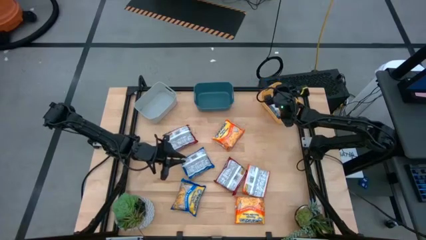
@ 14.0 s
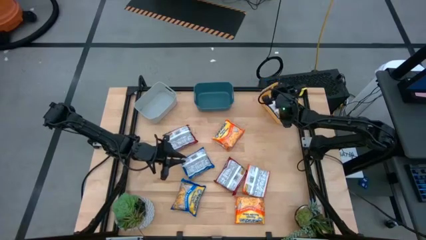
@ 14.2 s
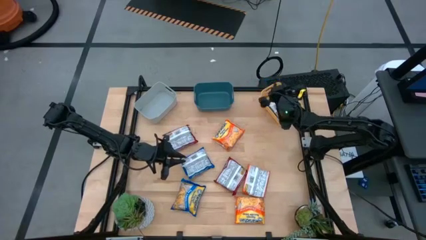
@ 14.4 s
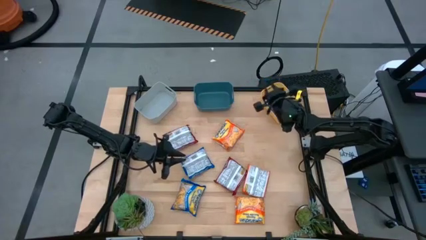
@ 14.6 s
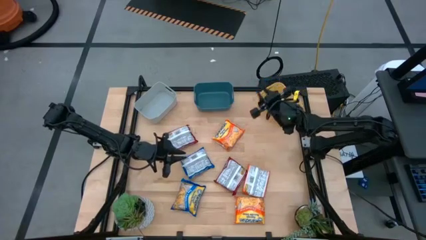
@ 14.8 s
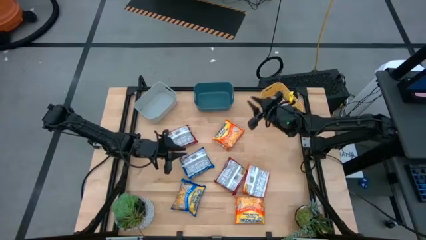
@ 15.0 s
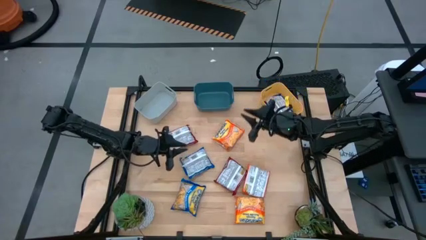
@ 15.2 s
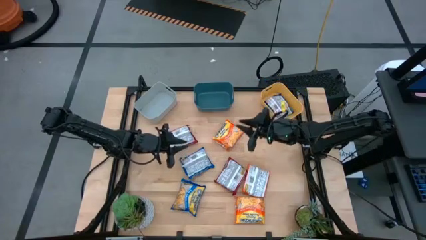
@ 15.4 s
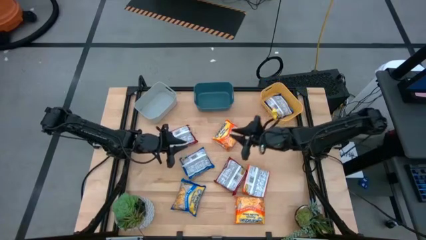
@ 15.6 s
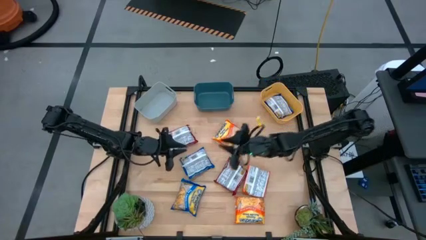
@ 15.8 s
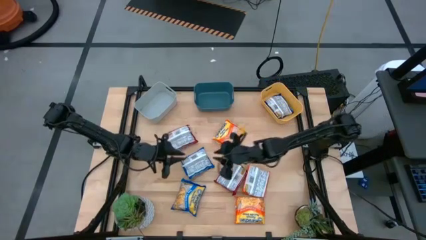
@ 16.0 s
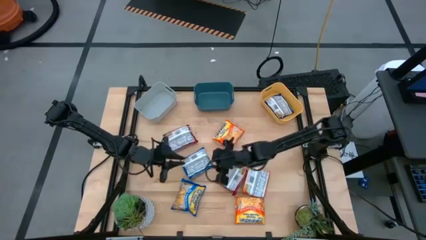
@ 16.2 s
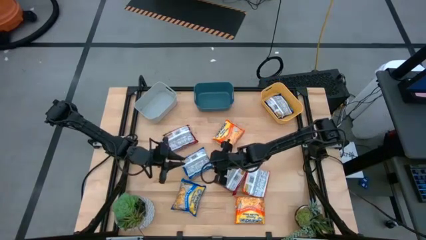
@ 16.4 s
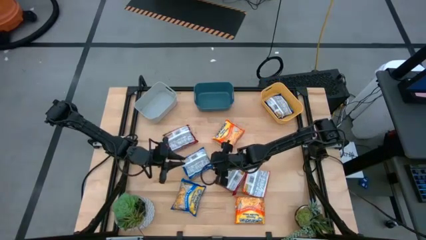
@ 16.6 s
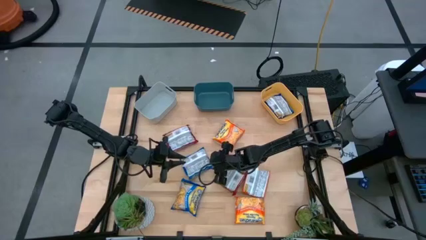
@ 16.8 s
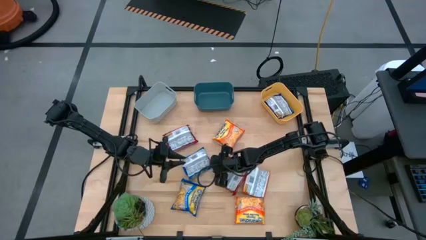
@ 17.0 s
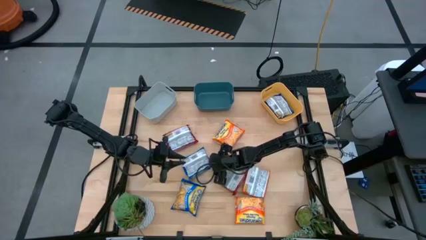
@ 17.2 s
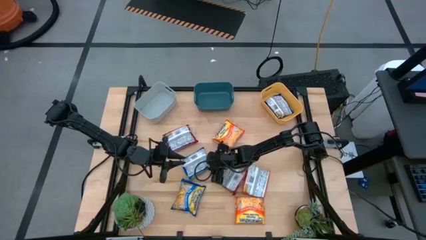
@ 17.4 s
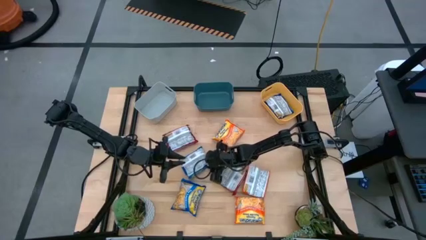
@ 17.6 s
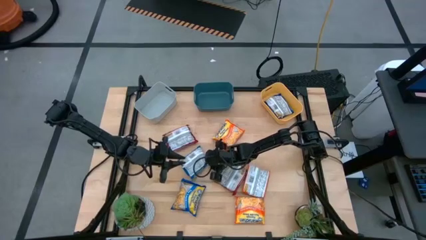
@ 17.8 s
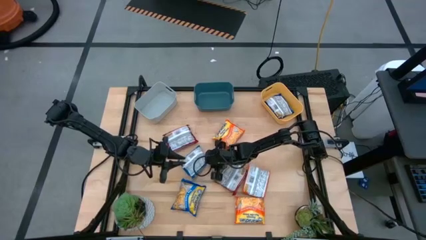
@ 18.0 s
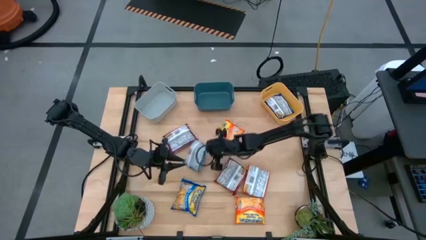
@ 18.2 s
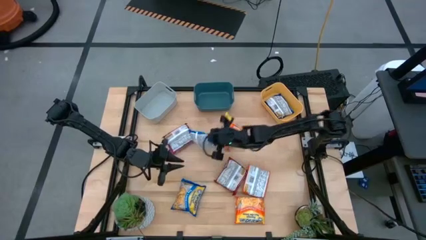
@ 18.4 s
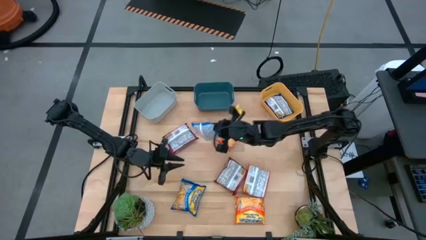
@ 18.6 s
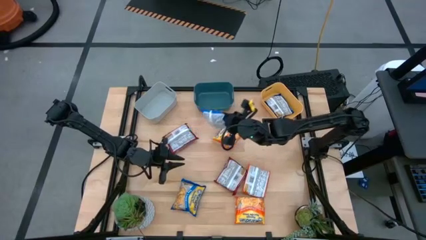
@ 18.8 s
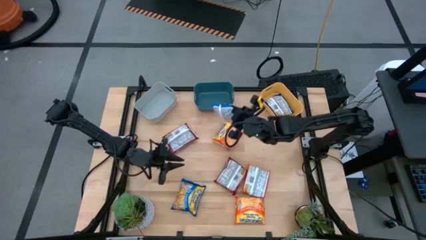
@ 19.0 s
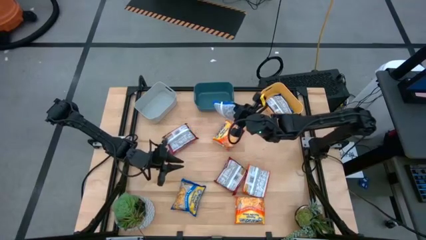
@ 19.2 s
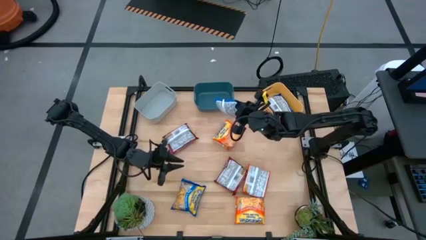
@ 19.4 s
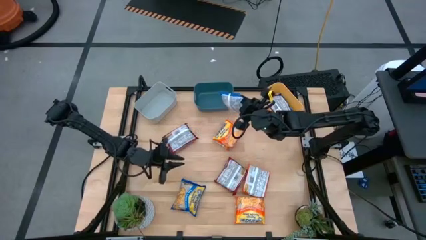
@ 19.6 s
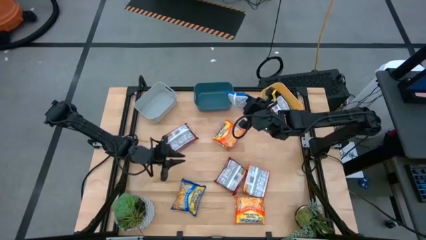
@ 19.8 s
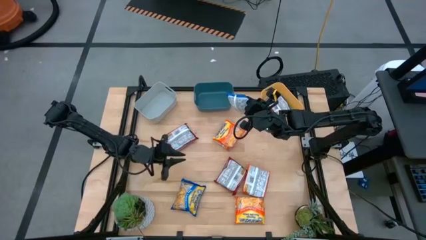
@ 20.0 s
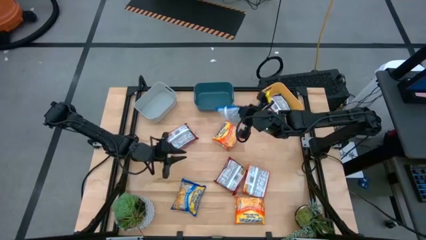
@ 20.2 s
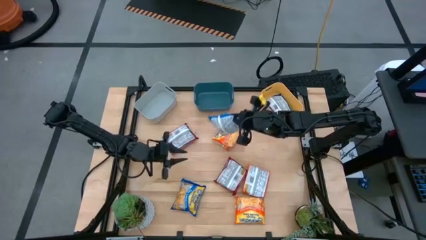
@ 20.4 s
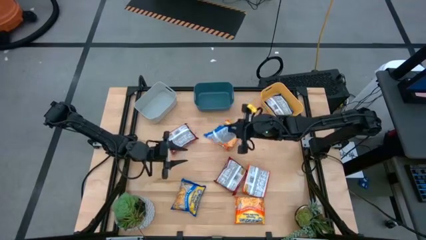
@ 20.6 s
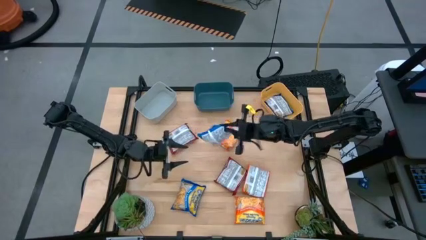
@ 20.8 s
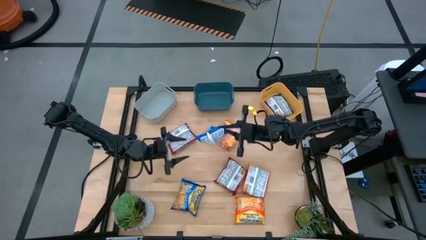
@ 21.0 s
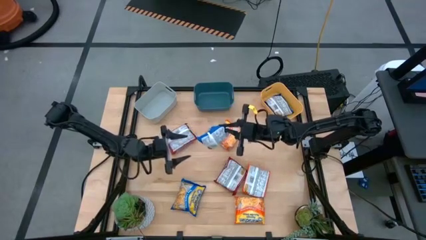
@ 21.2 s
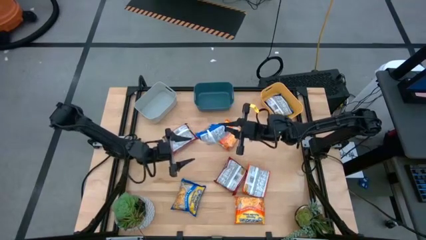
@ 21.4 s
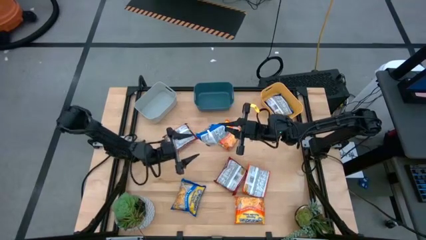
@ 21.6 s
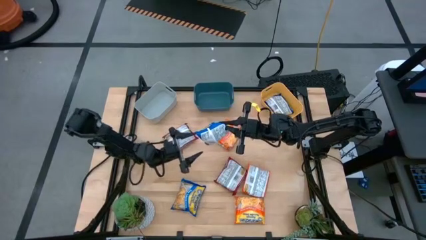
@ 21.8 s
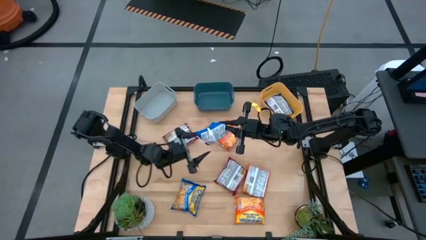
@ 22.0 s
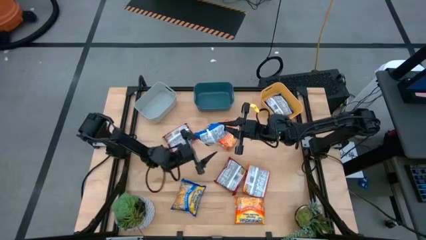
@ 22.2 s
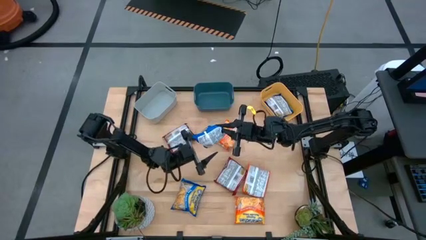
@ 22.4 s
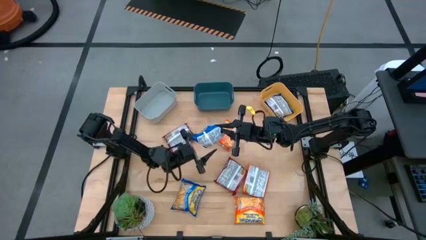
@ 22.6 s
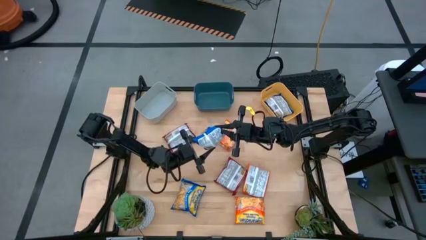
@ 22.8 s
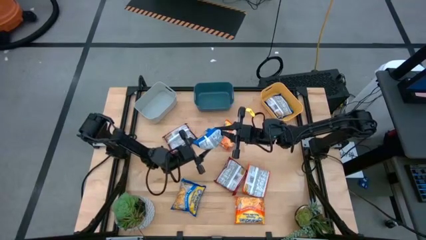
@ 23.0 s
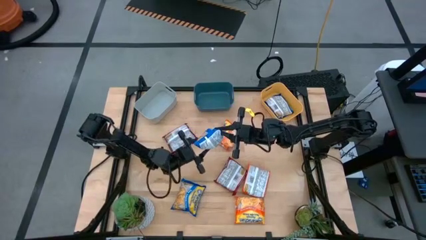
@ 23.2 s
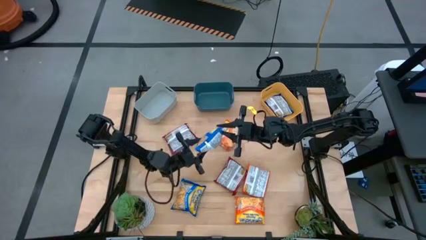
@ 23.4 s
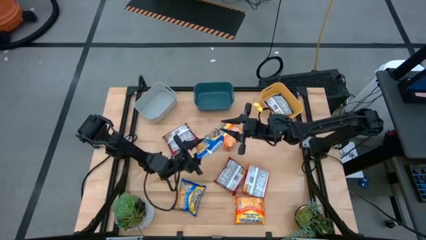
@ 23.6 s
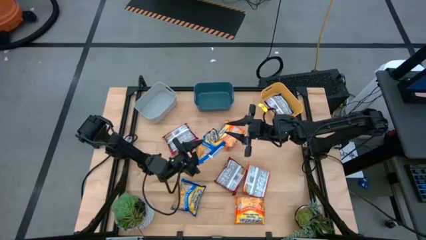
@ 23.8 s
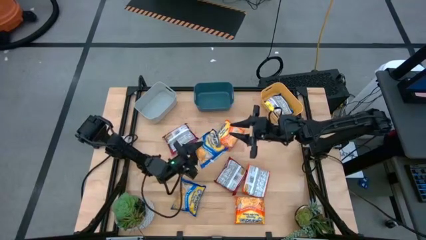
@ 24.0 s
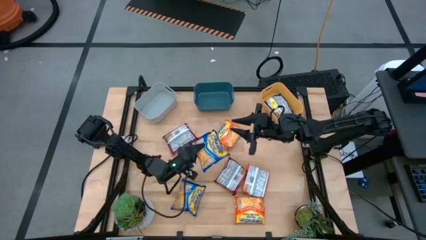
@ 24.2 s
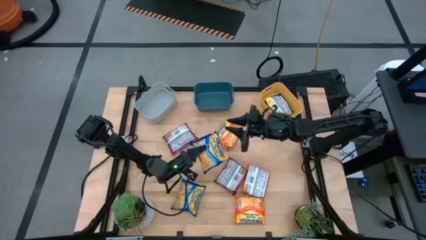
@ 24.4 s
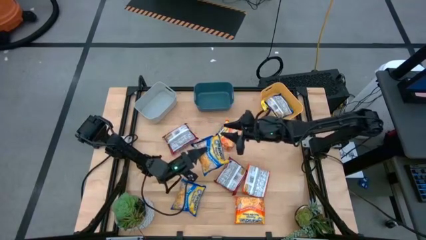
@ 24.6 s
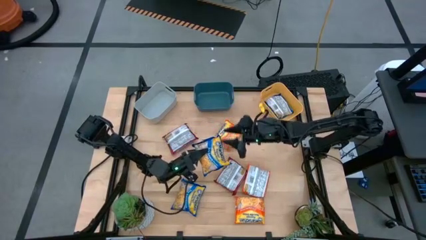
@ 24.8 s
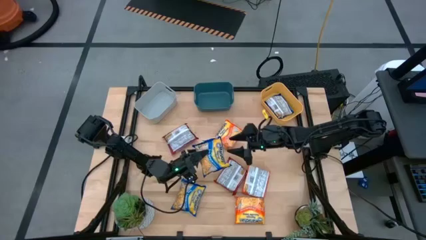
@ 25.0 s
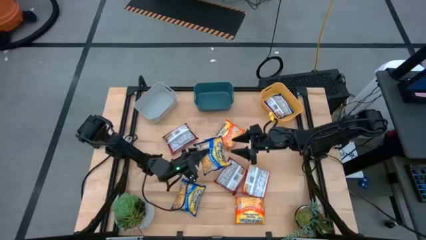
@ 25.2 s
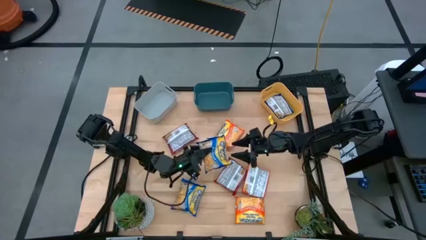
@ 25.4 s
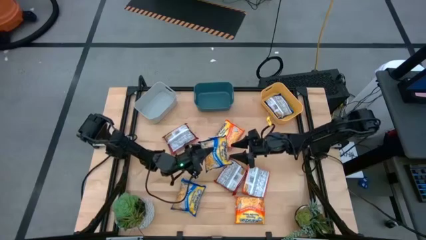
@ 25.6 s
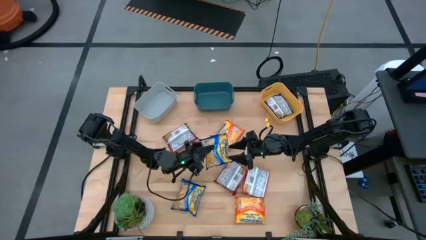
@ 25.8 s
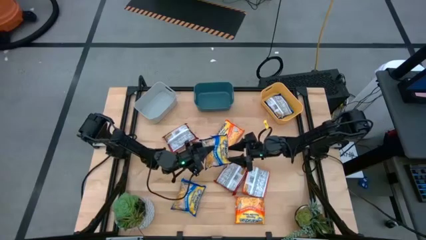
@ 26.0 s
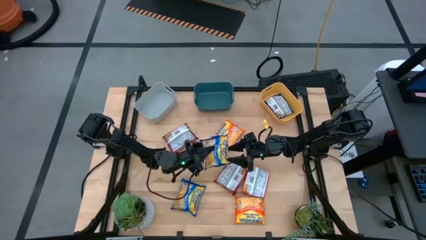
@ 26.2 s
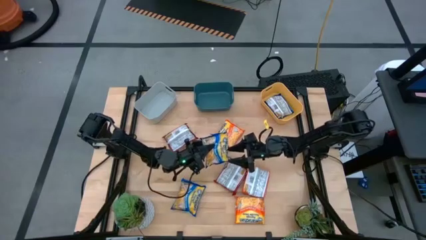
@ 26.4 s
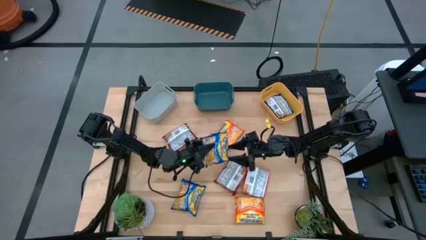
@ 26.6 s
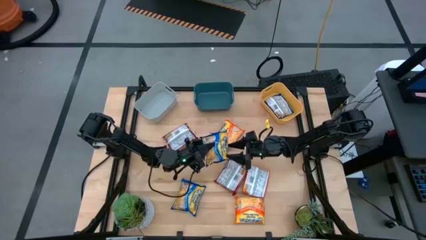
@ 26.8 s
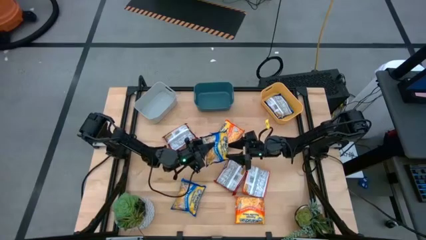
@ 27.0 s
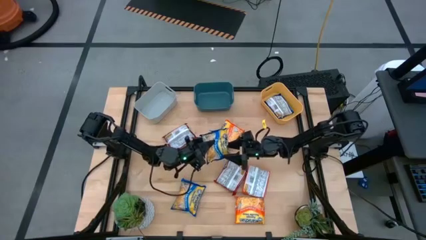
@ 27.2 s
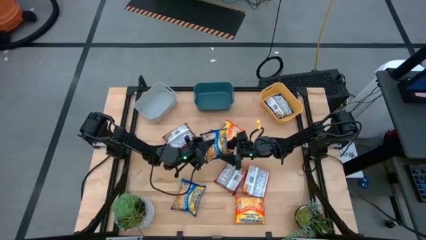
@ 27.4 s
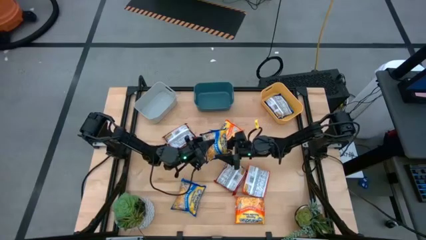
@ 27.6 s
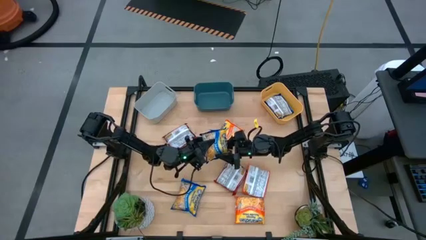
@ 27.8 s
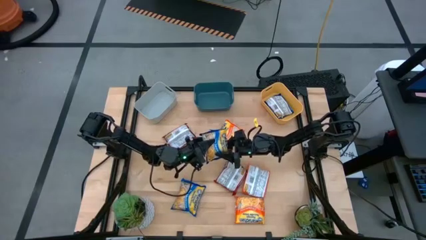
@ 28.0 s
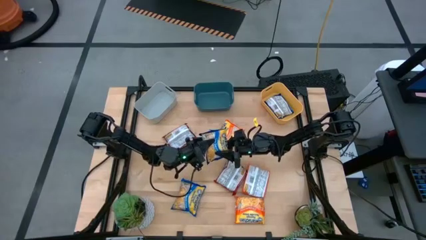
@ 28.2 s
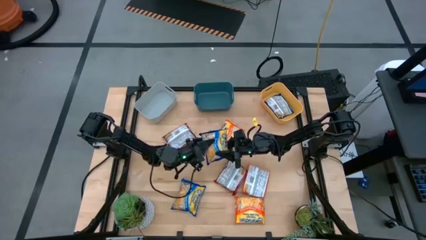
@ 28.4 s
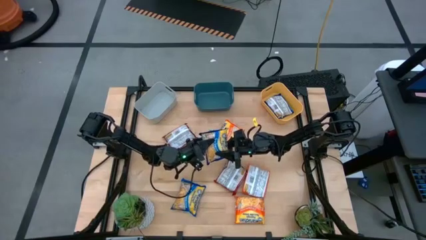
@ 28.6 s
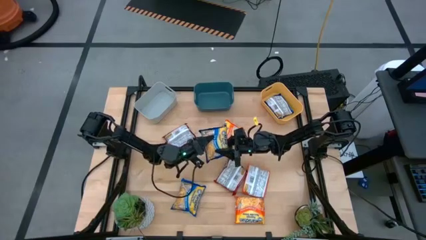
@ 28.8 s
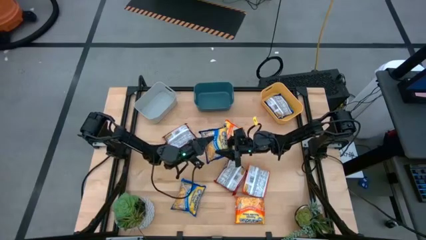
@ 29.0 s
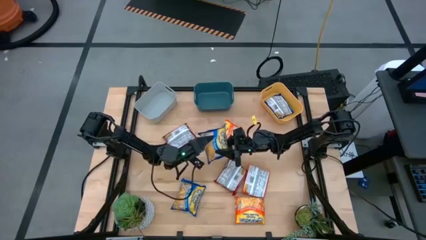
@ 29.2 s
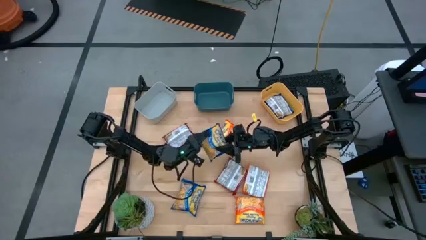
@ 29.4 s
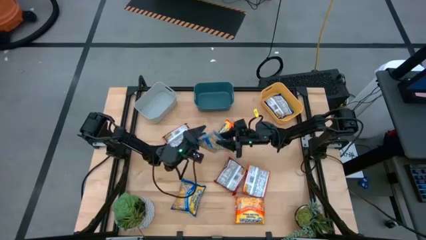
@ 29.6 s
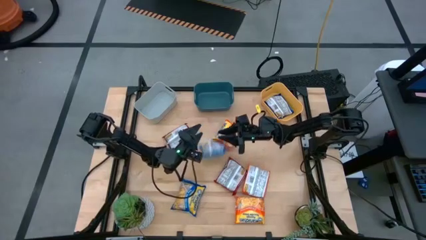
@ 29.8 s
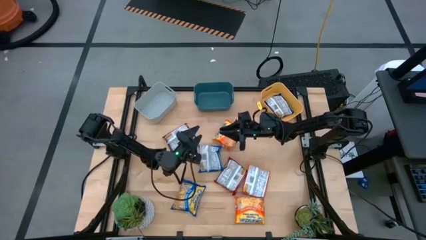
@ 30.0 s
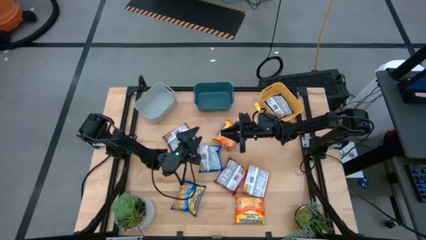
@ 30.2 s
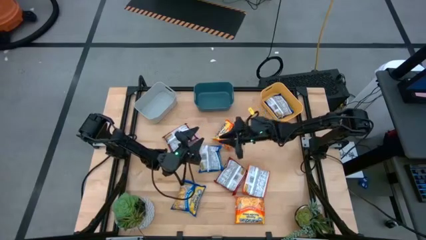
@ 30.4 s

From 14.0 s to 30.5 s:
Task: Sort Maruchan noodles
Put the top blue noodle pack into the yellow bin
